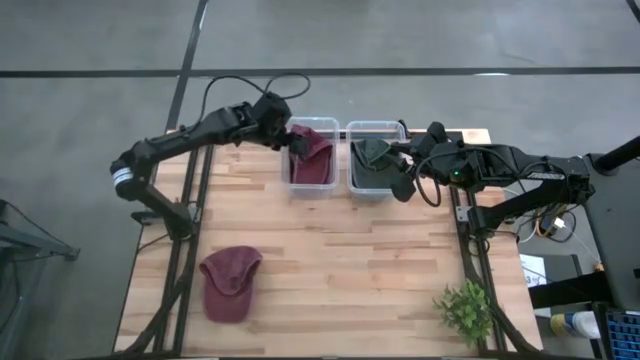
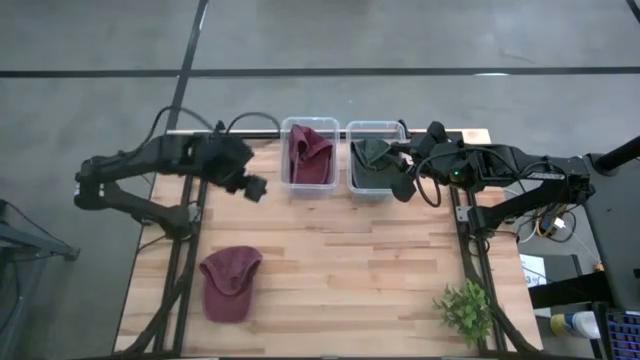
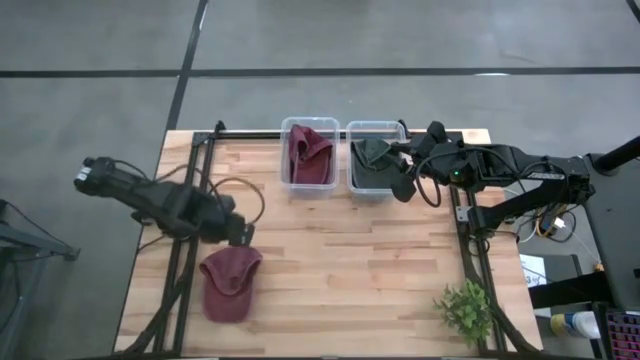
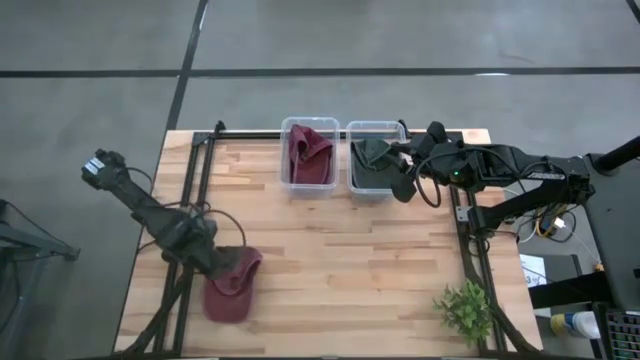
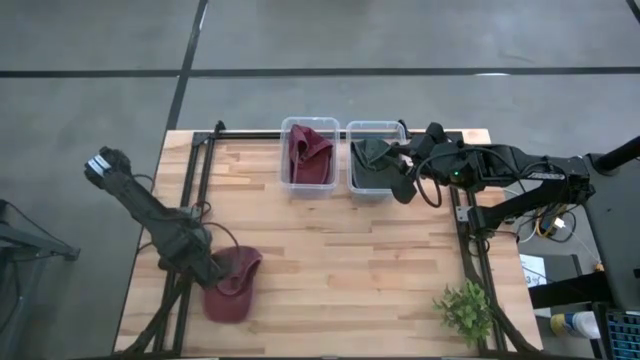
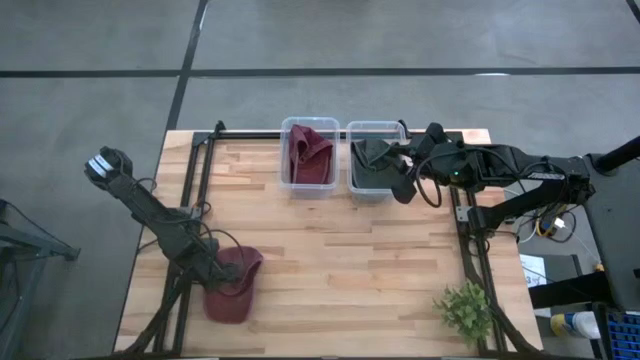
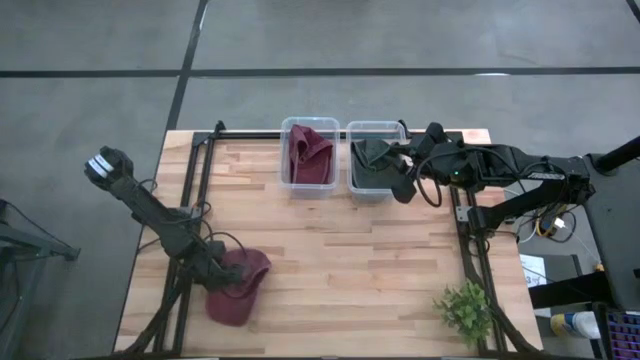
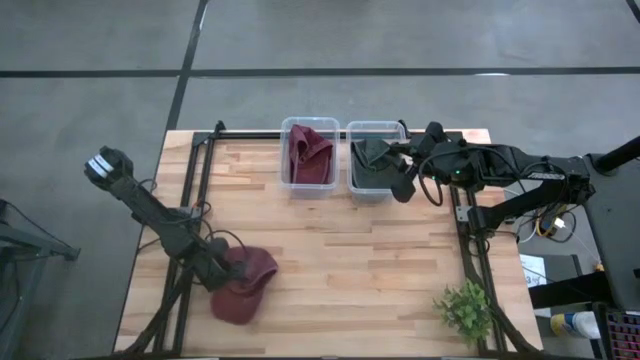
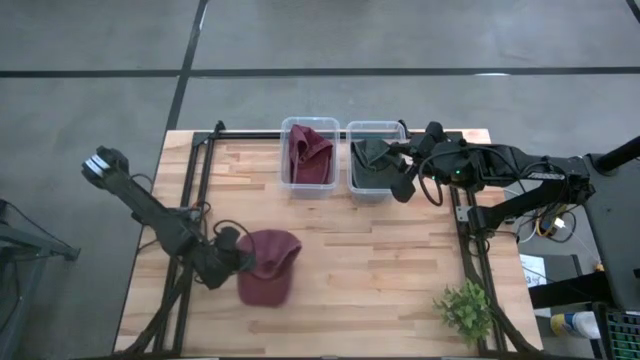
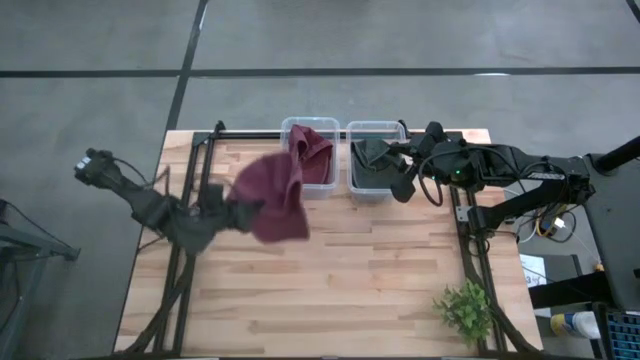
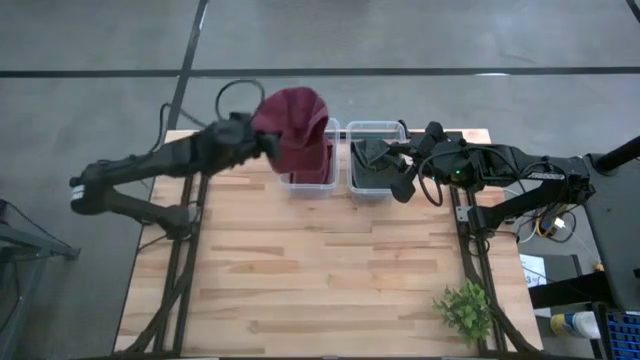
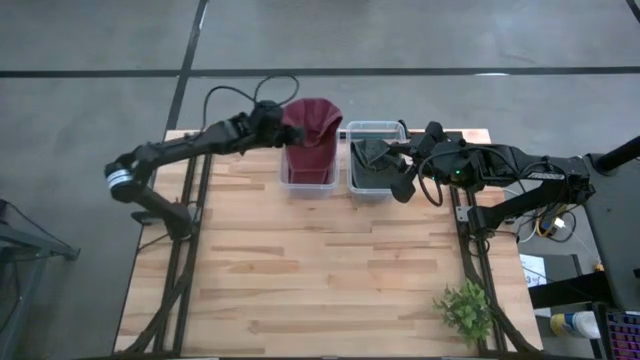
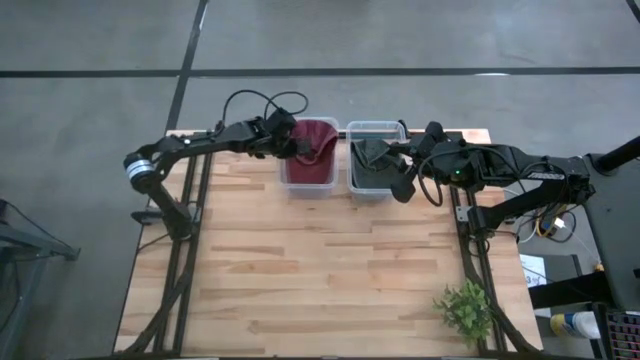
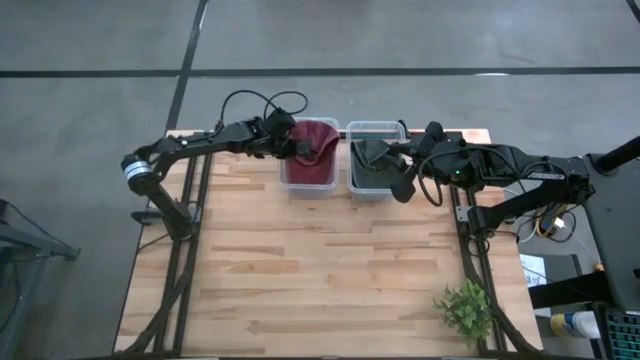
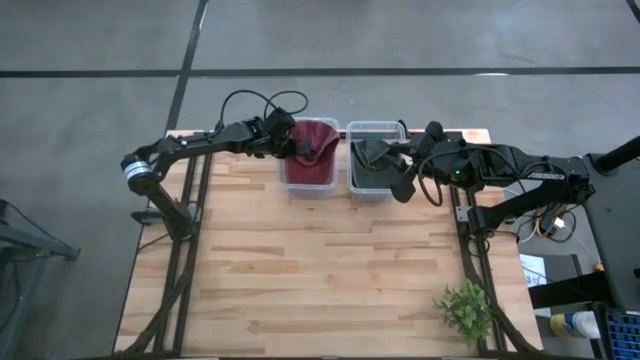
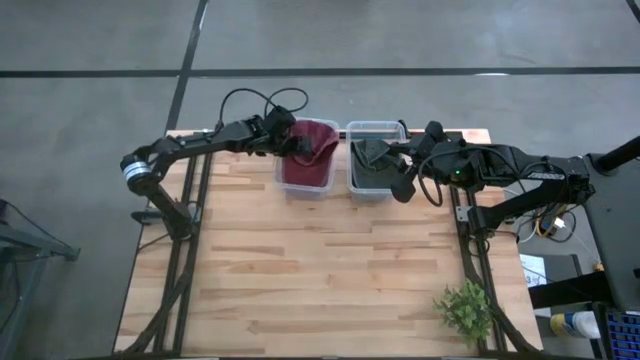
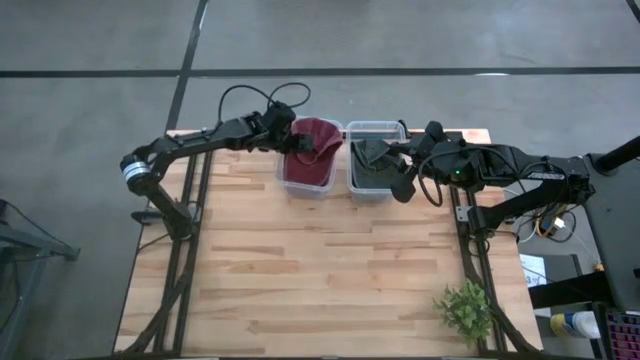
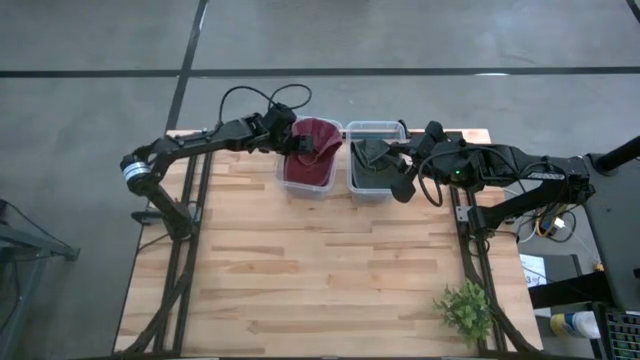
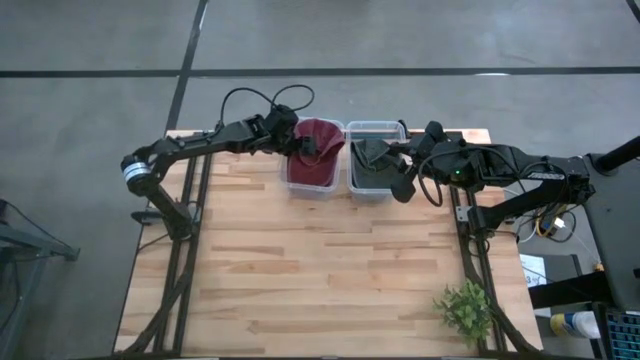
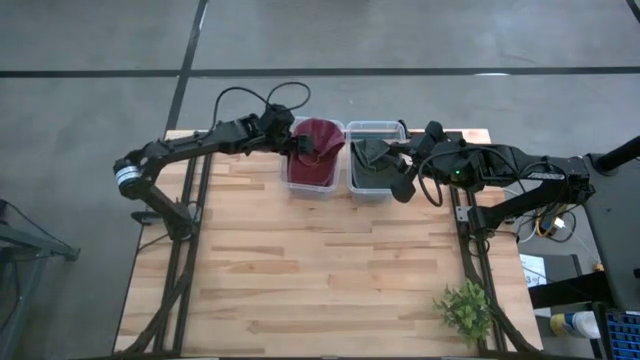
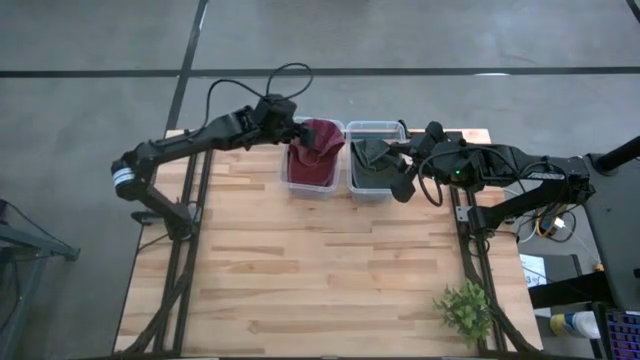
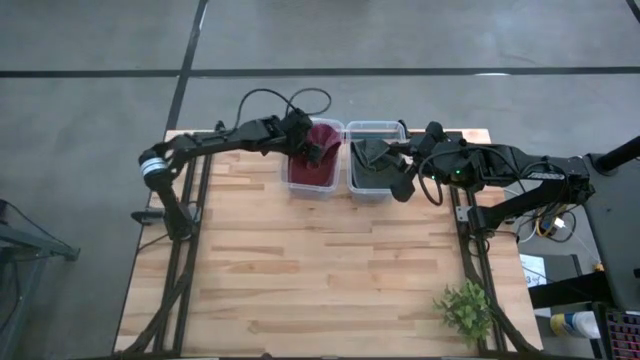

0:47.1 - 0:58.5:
Task: Pick & Place hat
Put the red cap into the left transparent bin

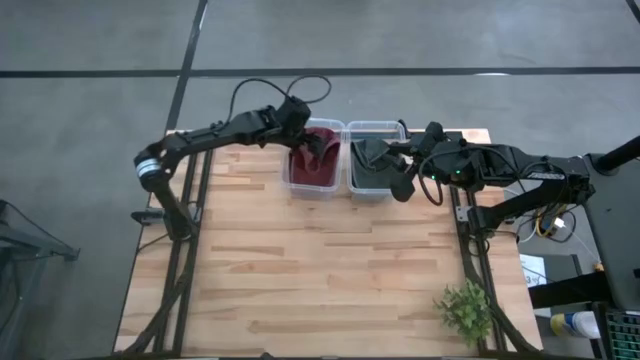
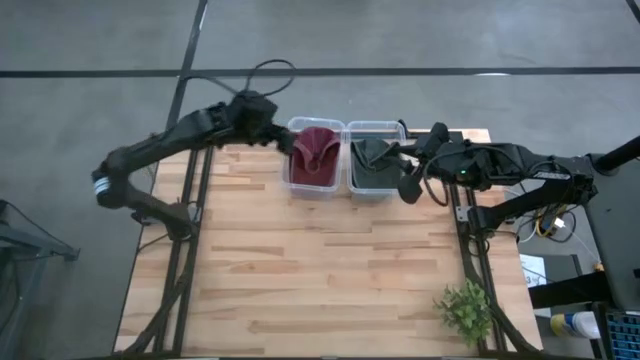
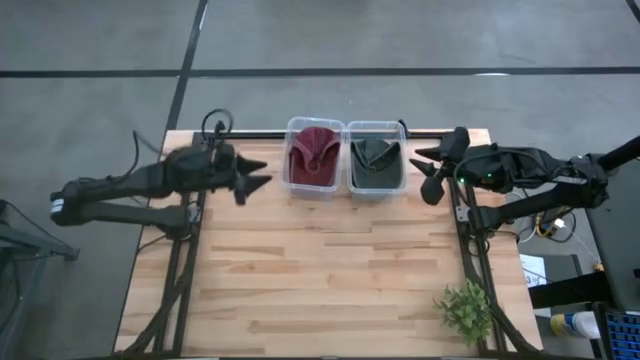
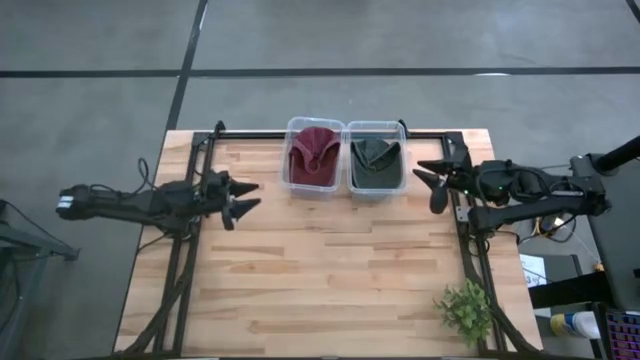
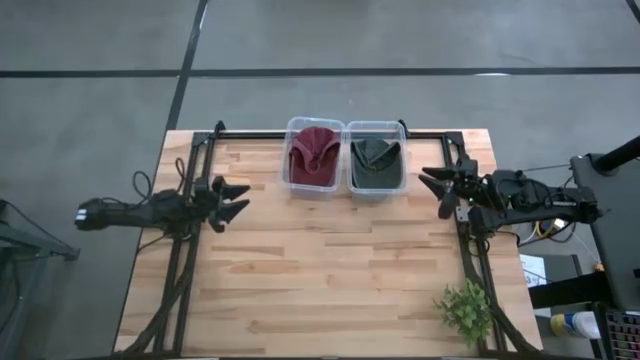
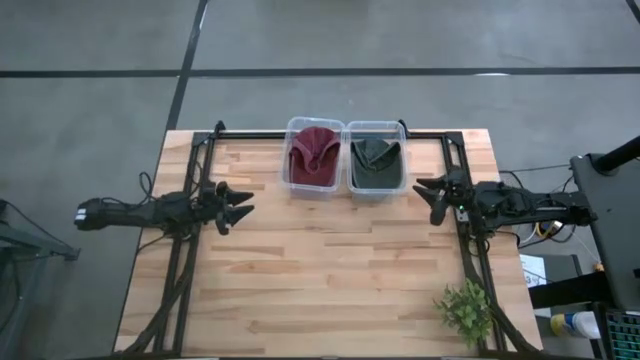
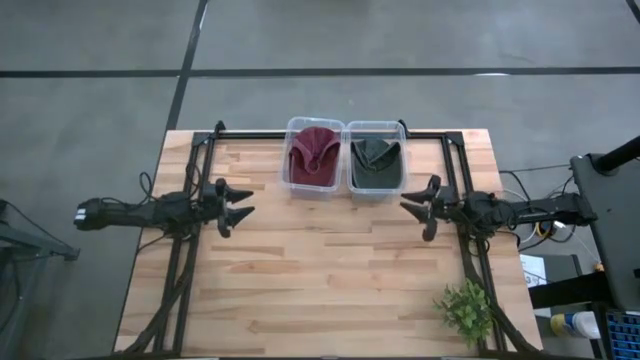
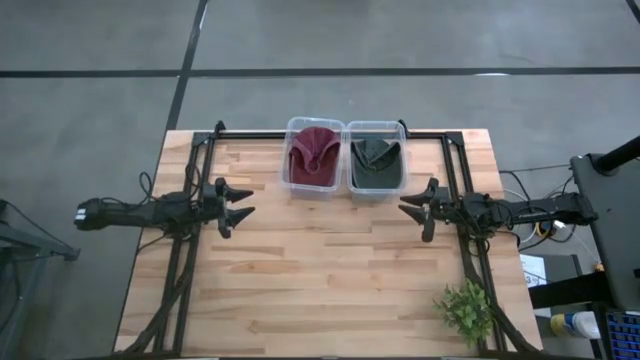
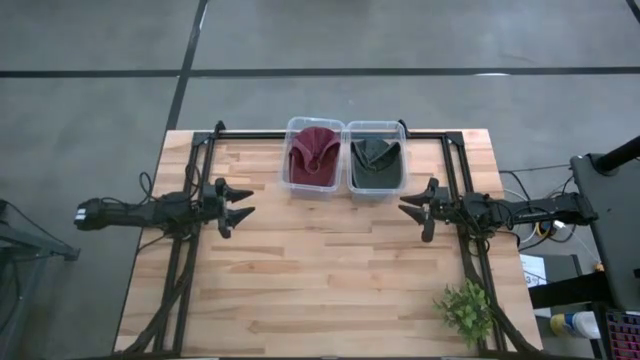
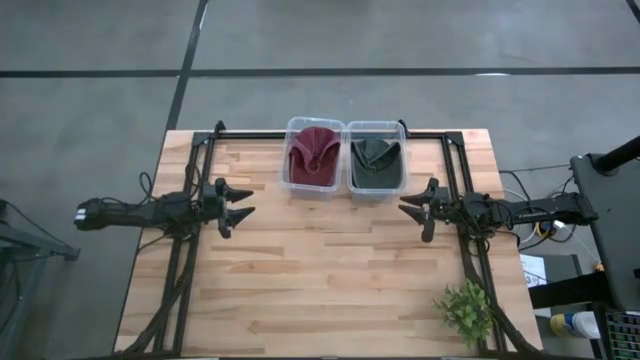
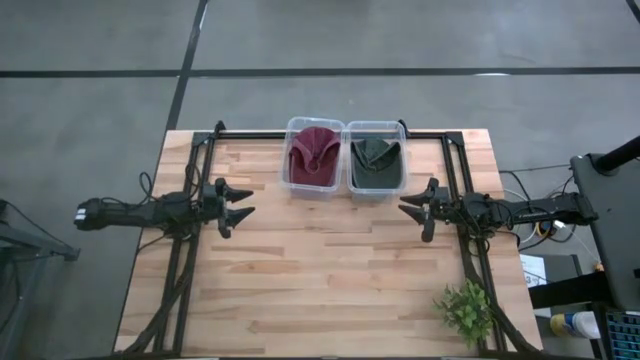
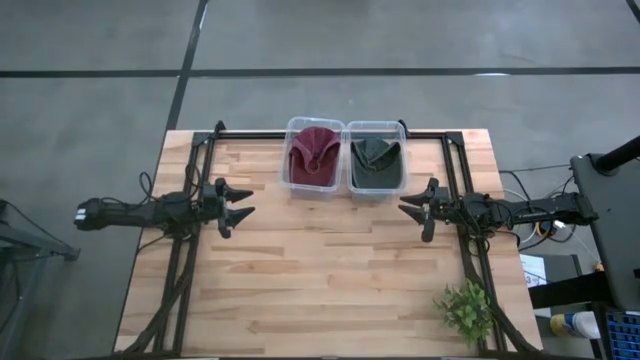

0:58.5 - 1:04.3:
Return to Home Position

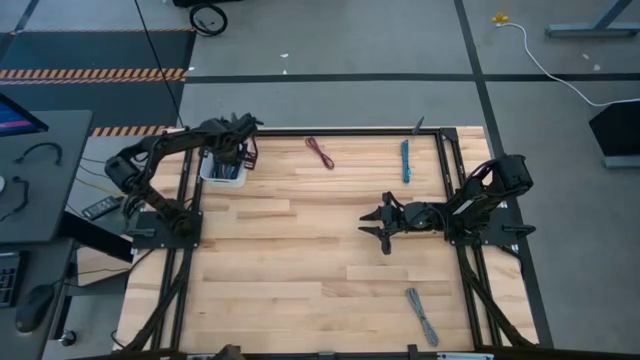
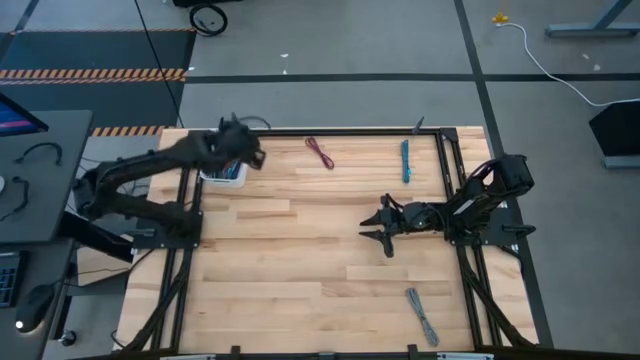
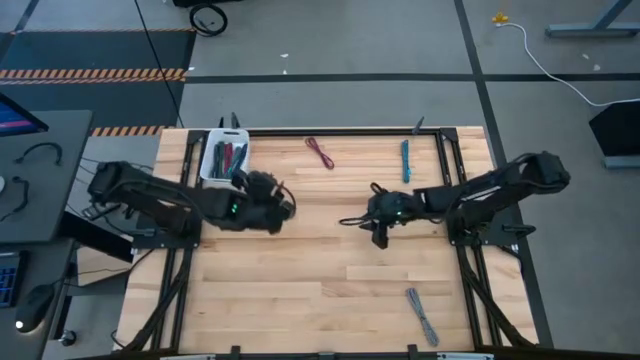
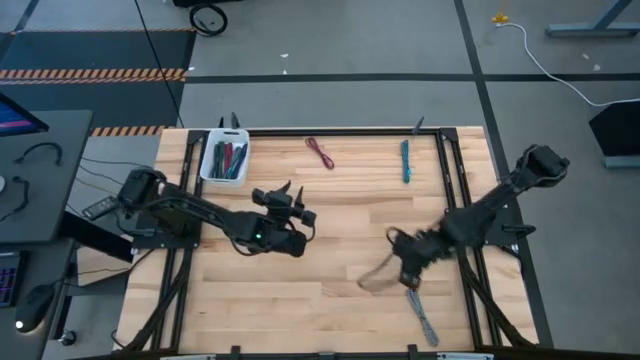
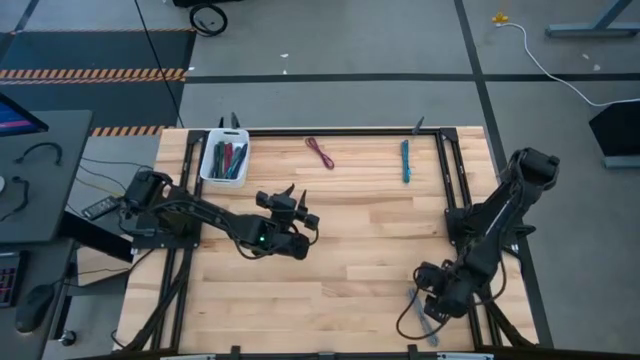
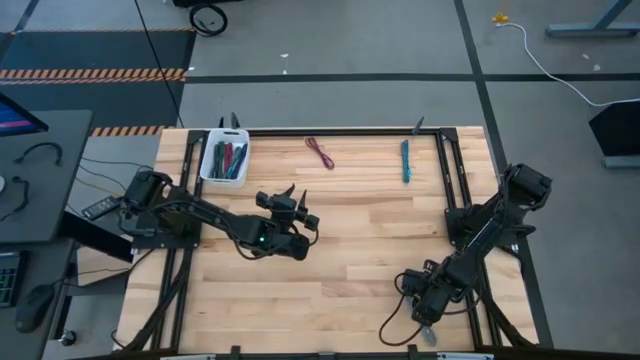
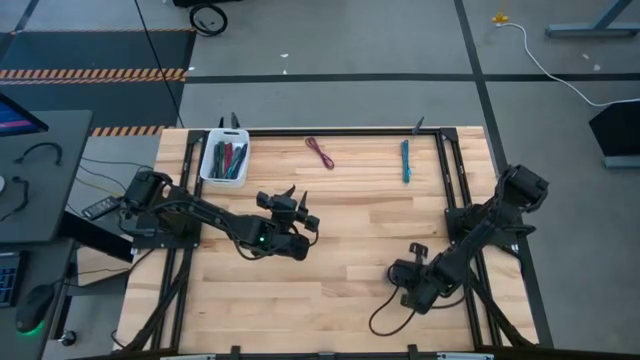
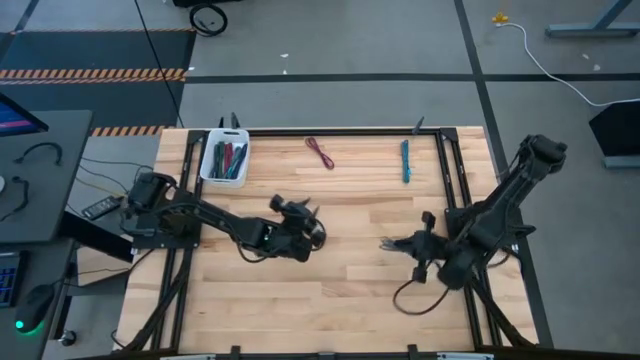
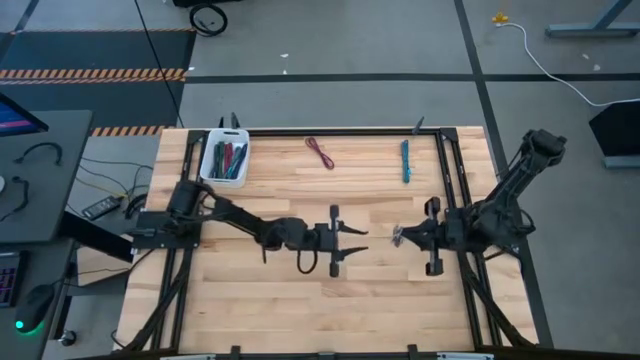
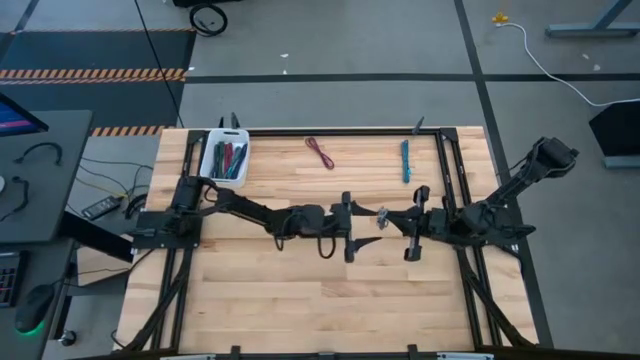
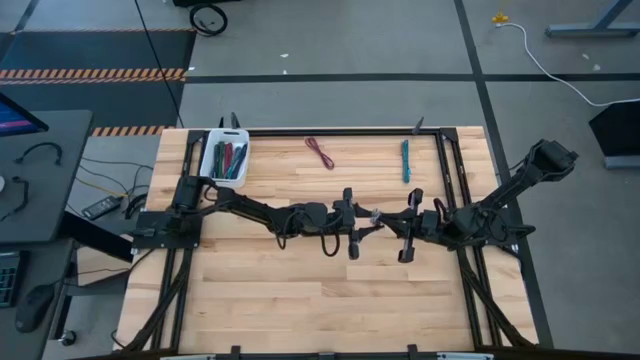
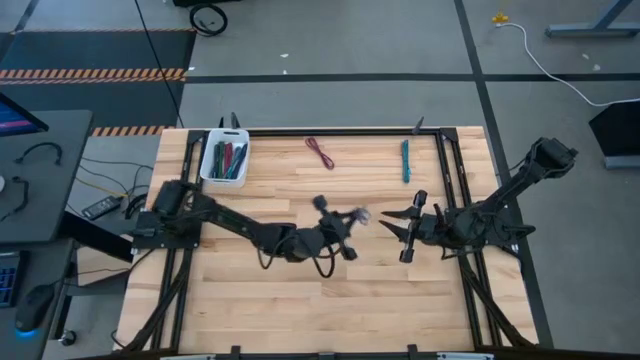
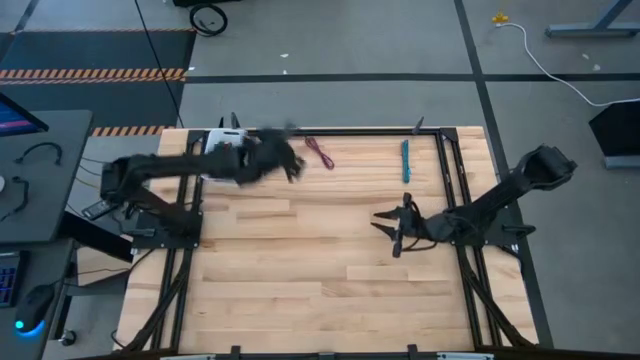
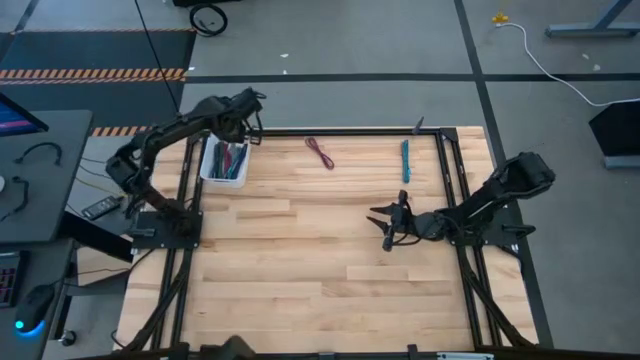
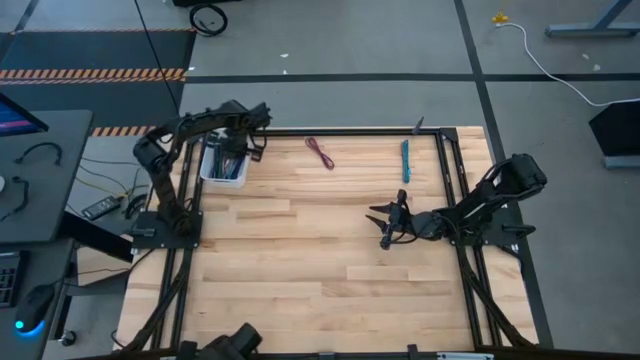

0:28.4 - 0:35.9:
Task: Pick and place USB-C Cables
Put the gray charger cable into the white bin
